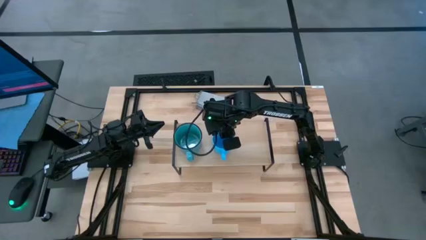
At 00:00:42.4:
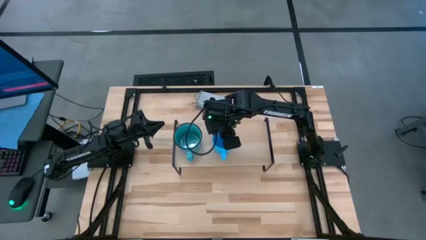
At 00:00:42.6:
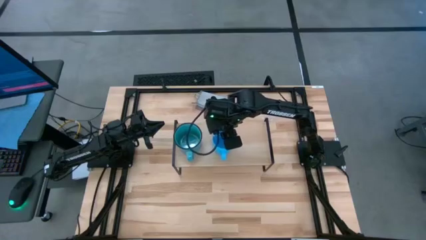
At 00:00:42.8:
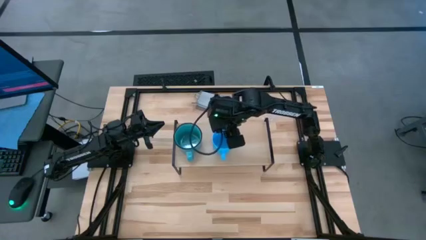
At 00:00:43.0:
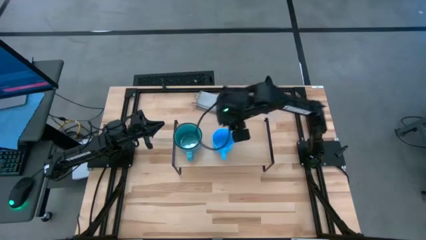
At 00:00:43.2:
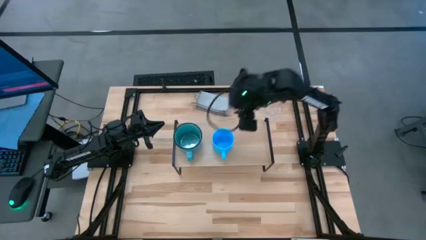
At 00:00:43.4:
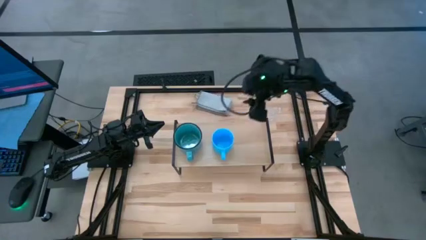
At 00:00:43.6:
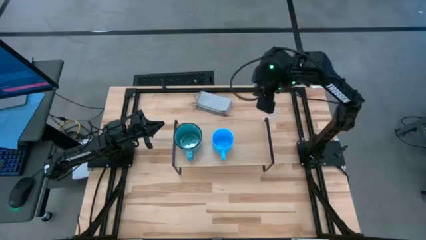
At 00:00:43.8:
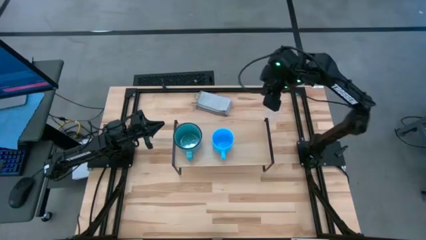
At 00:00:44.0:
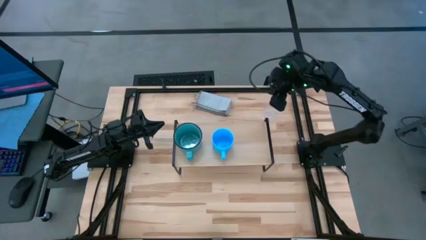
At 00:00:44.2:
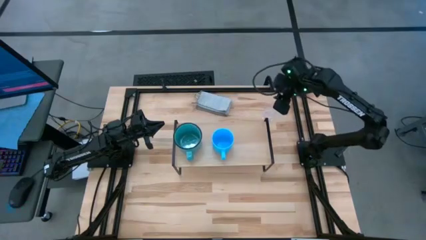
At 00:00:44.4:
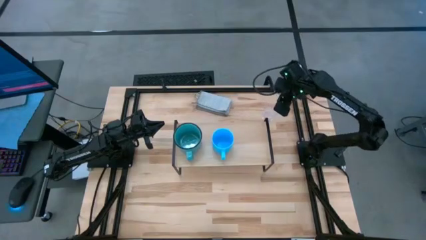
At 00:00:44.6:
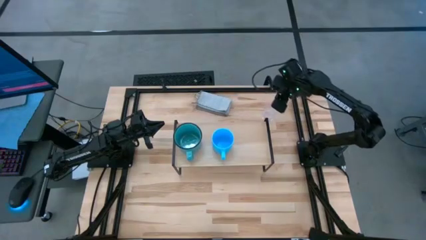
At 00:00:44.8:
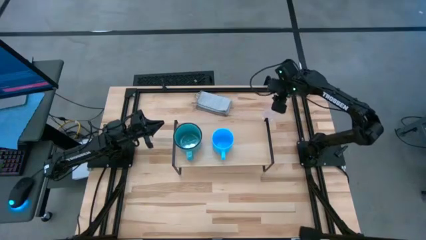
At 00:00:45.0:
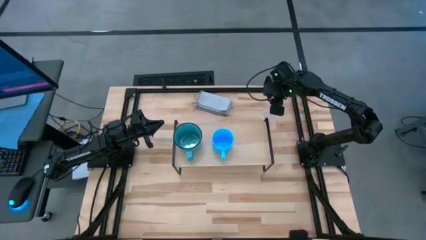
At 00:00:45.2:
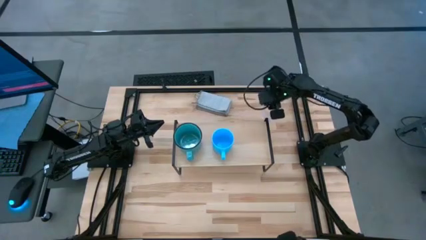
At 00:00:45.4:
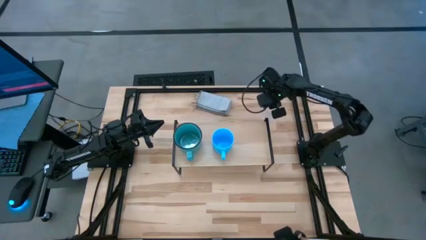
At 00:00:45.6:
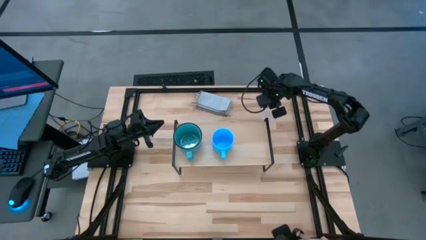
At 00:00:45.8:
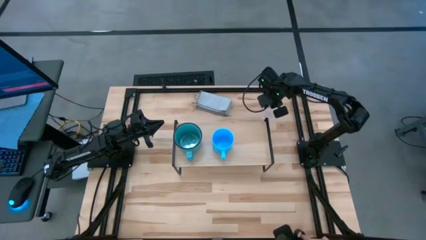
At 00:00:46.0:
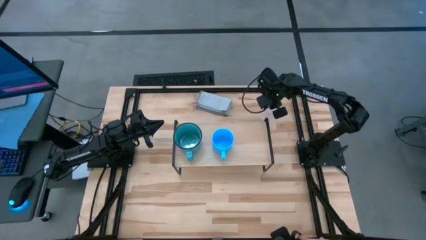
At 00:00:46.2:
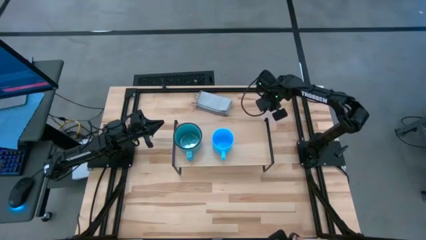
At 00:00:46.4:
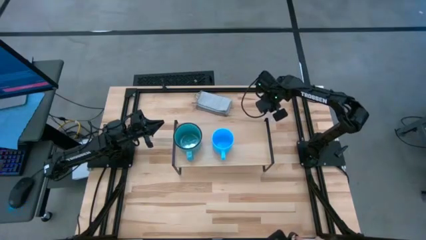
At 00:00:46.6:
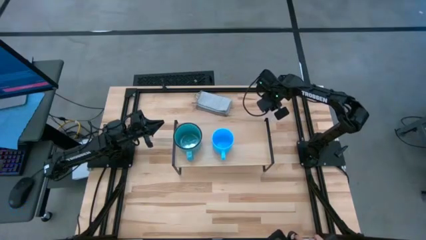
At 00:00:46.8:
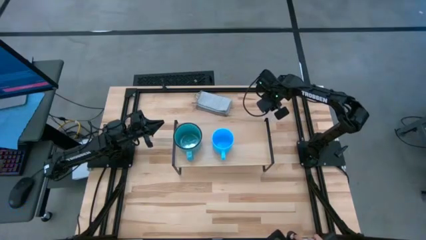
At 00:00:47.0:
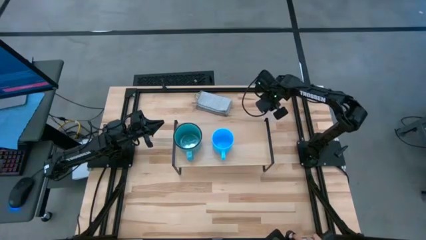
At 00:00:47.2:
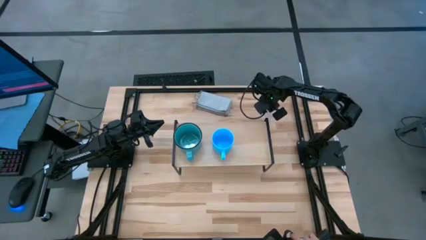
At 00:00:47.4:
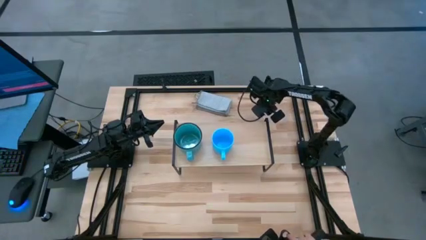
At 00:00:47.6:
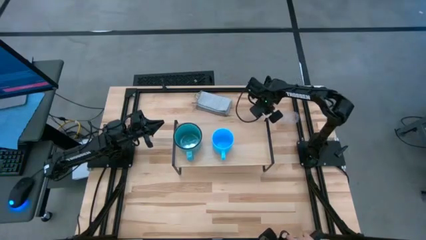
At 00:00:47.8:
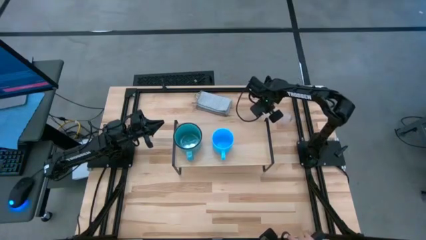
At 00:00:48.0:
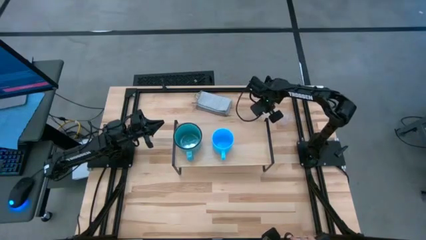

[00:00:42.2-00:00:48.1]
Task: Stack small to large cups/mugs on shelf
Put the transparent mug on the shelf
